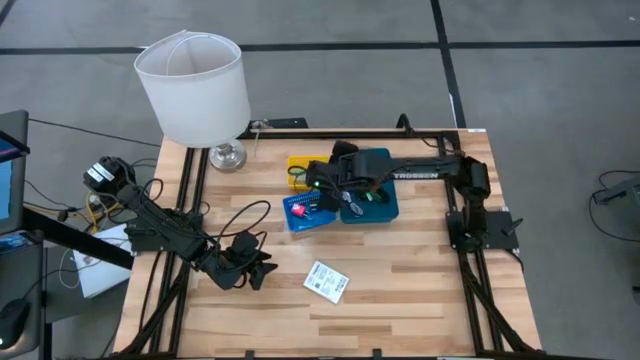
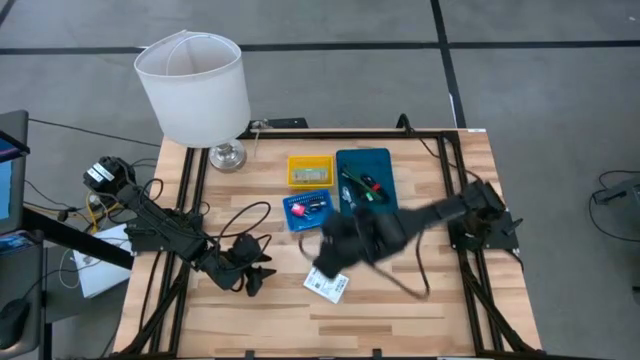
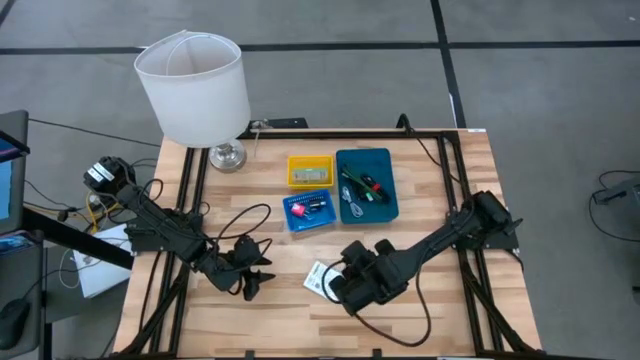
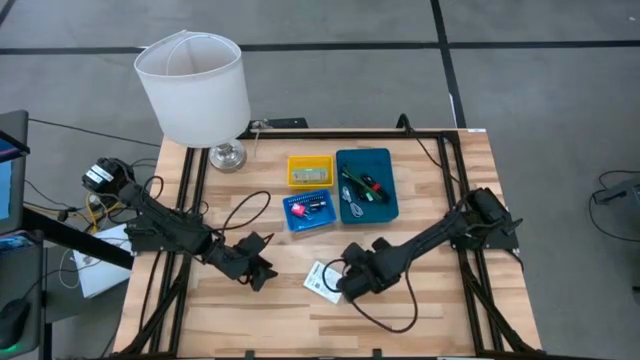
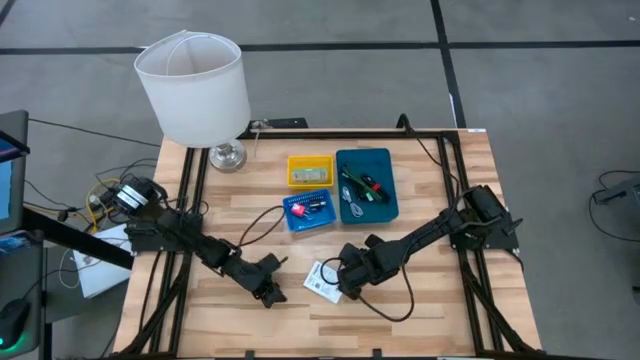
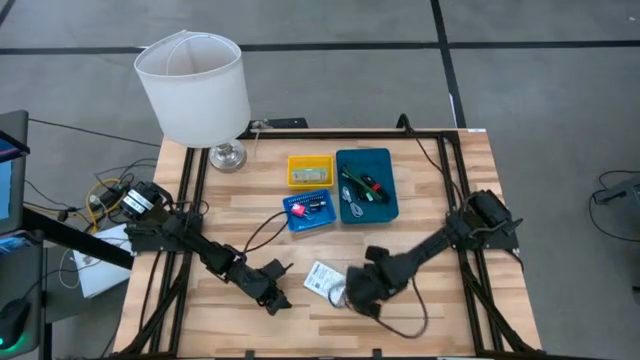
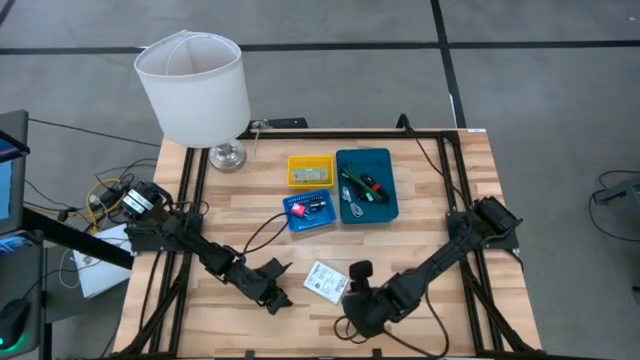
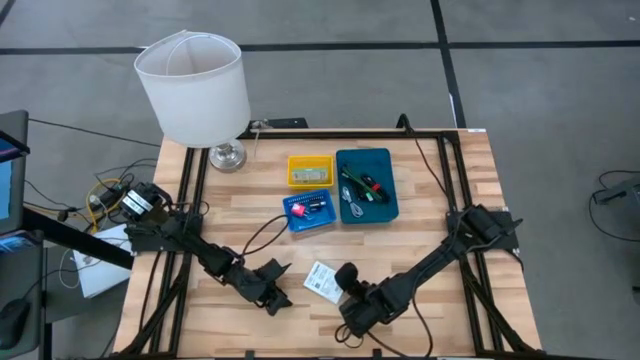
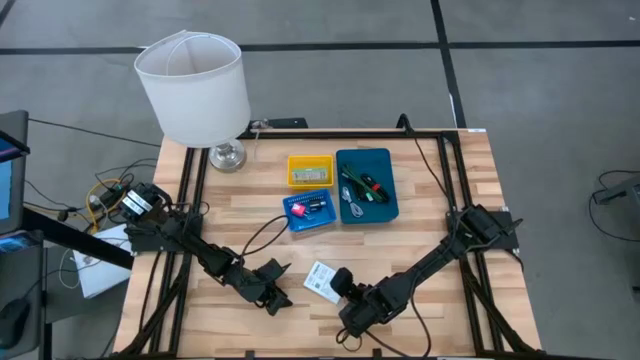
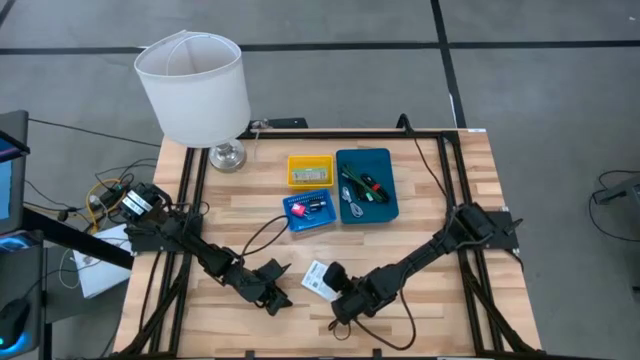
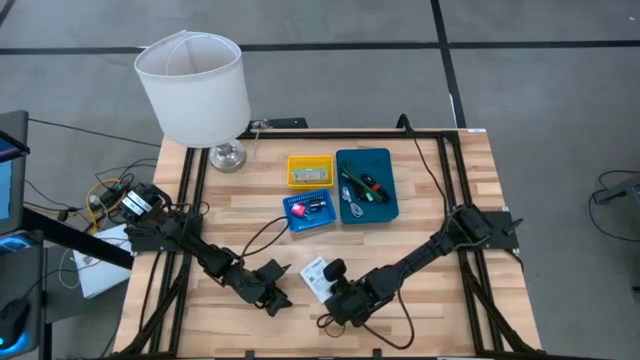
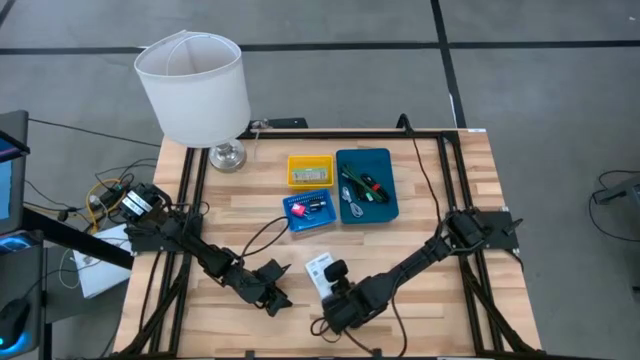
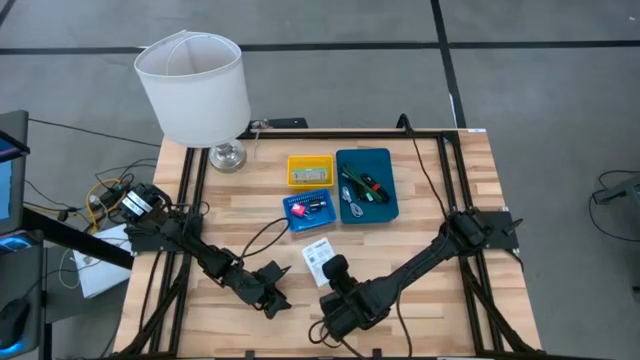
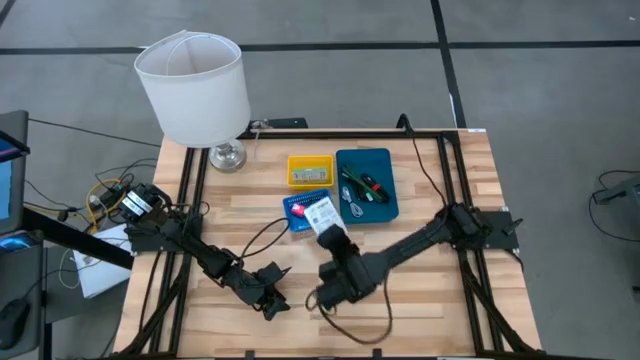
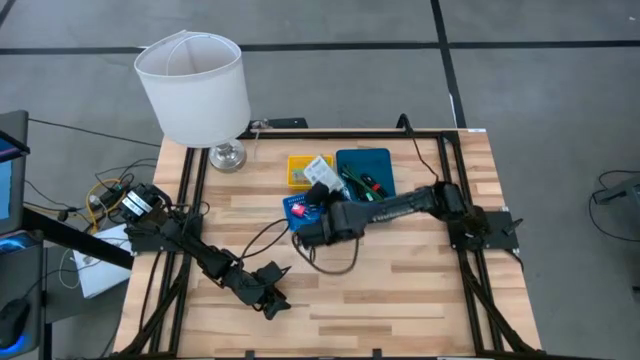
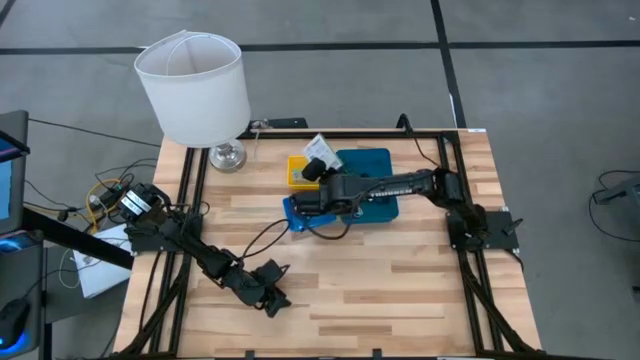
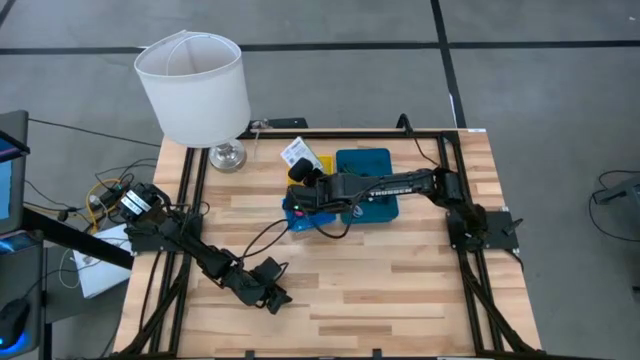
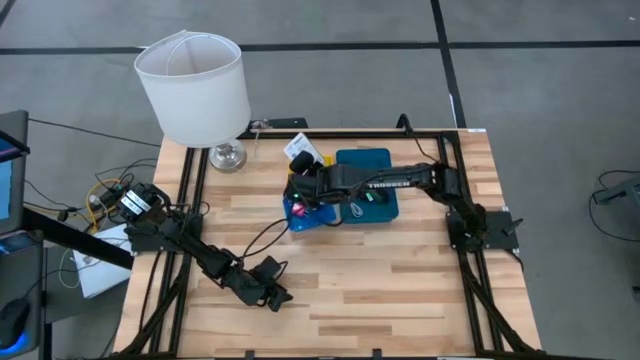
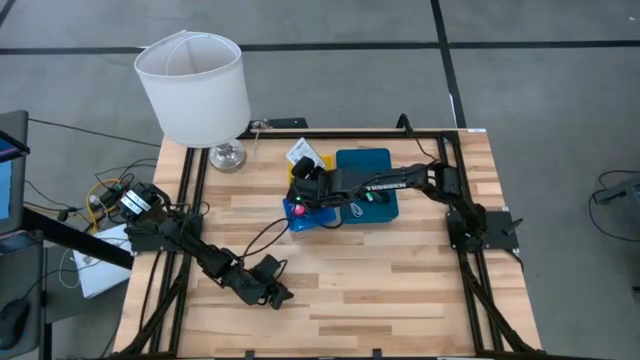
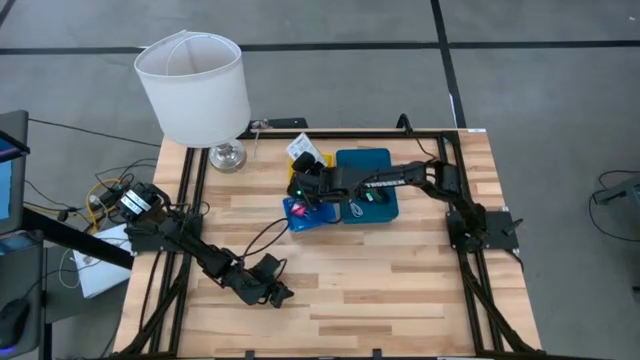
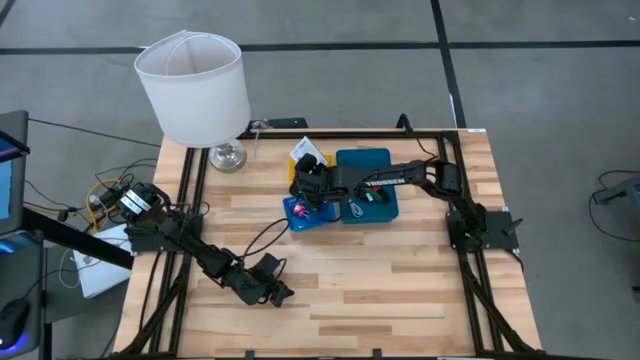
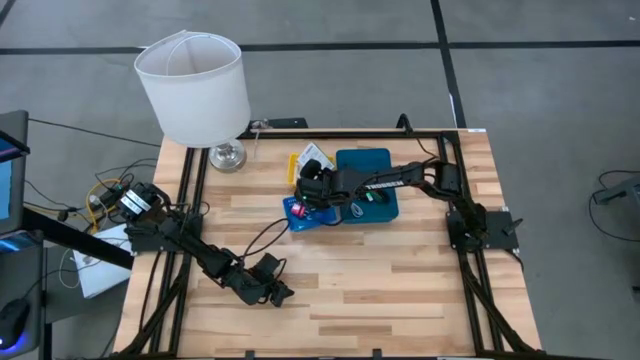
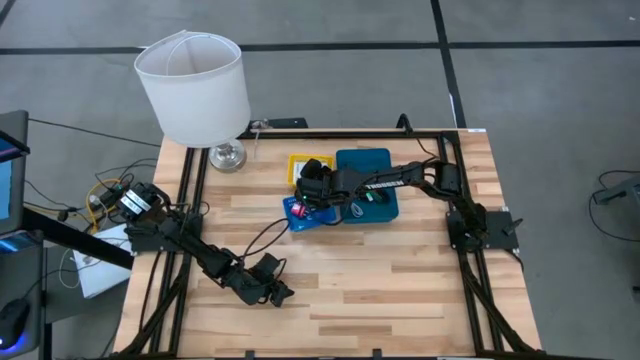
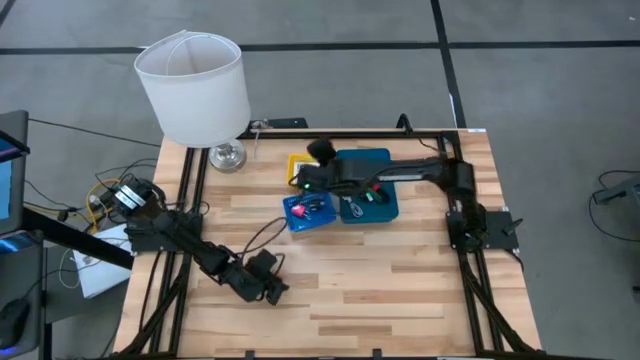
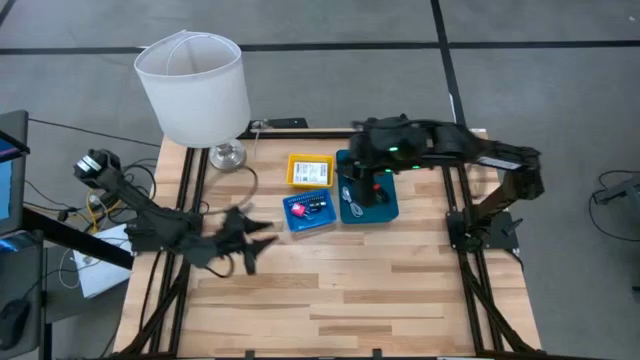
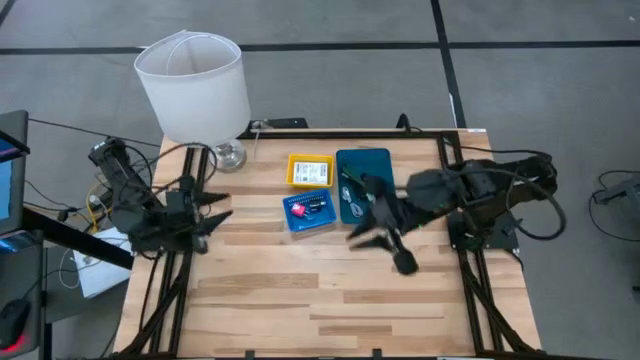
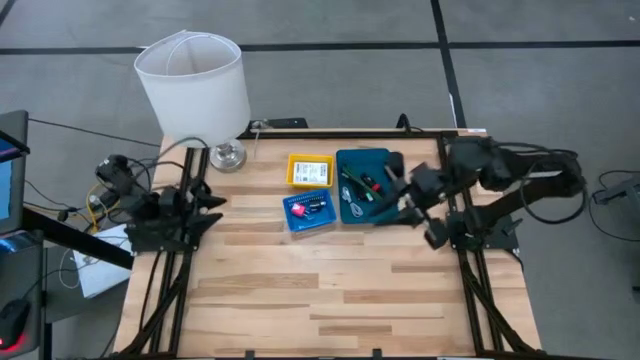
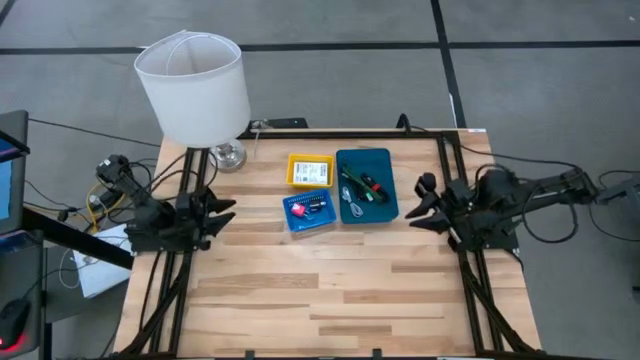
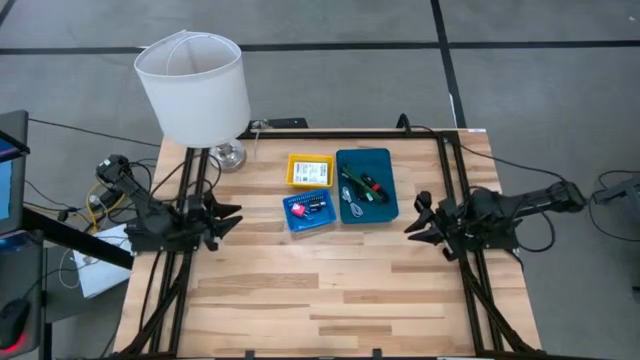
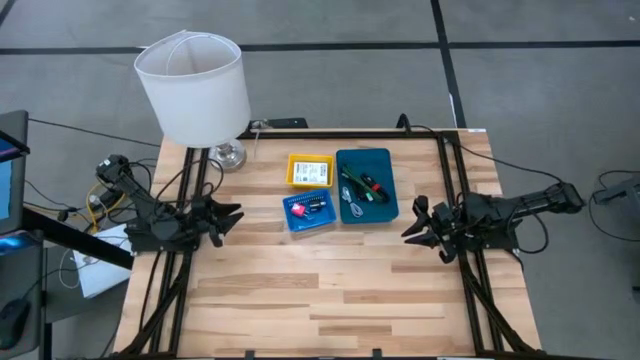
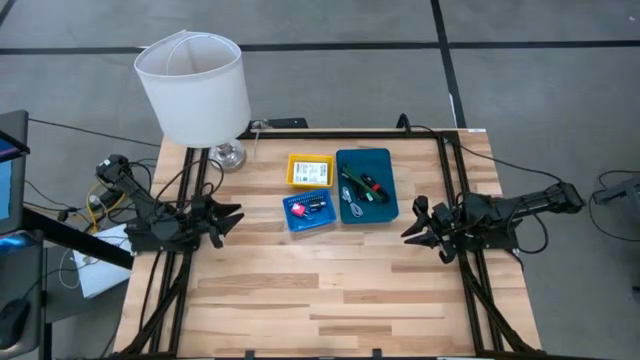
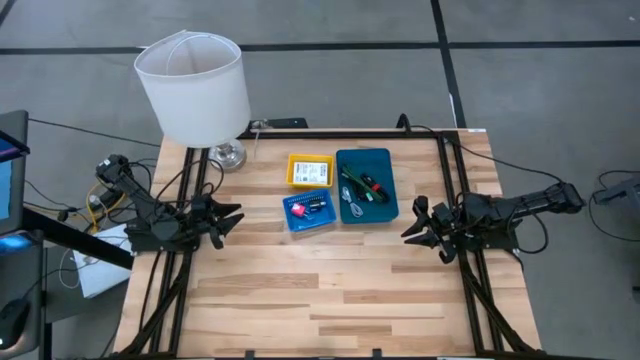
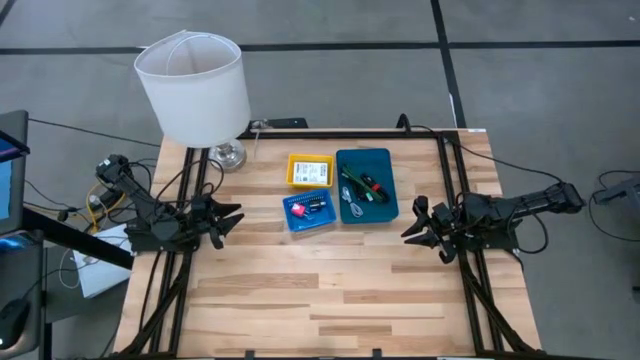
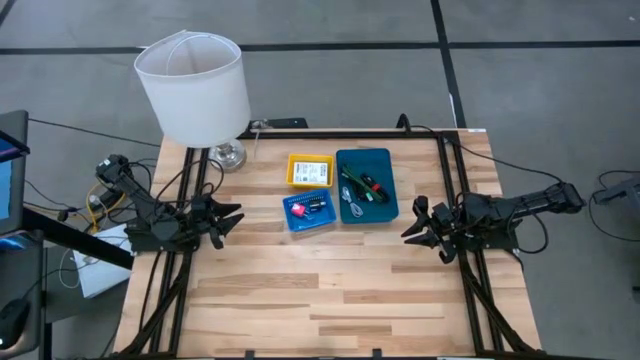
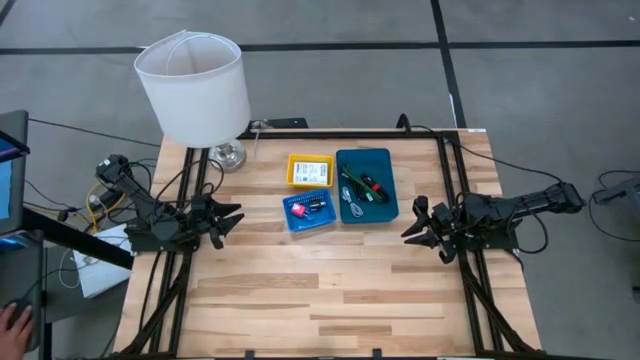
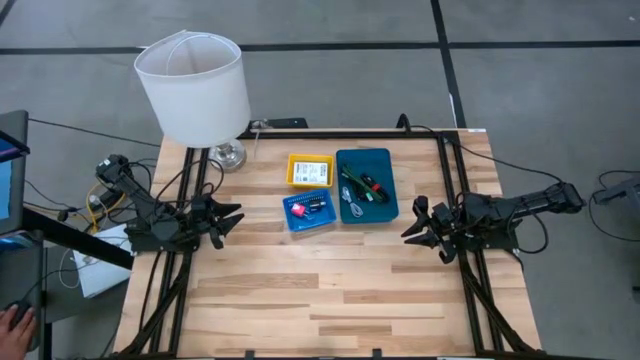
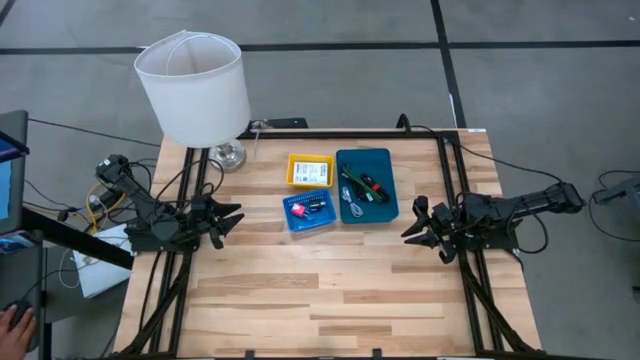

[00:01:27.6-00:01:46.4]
Task: Pick and place items into bin
Stack the white card reader box on top of the white card reader box in the yellow bin

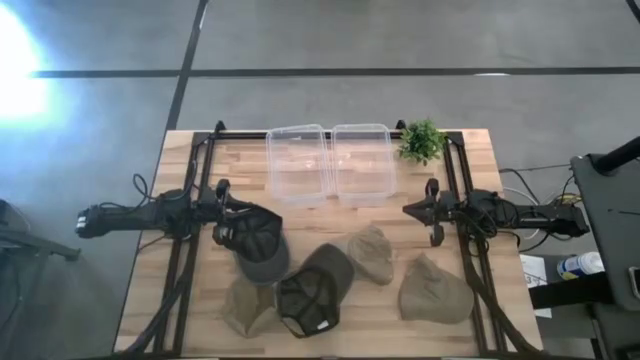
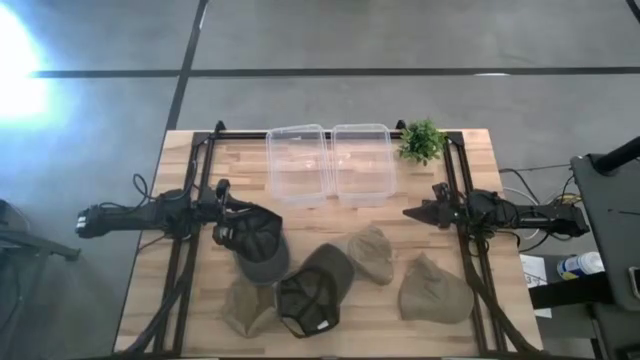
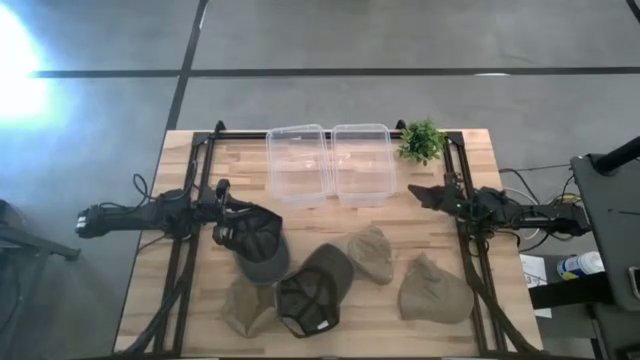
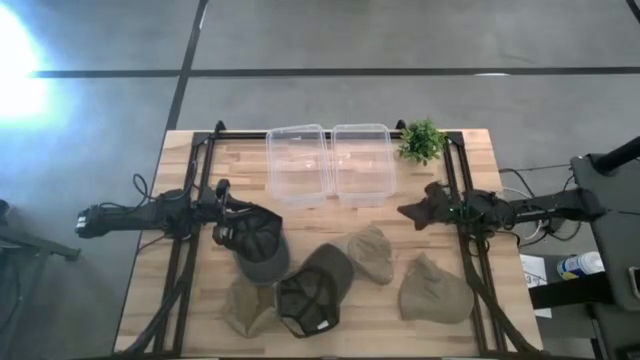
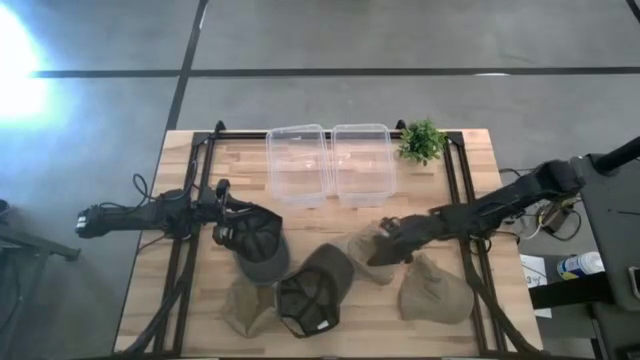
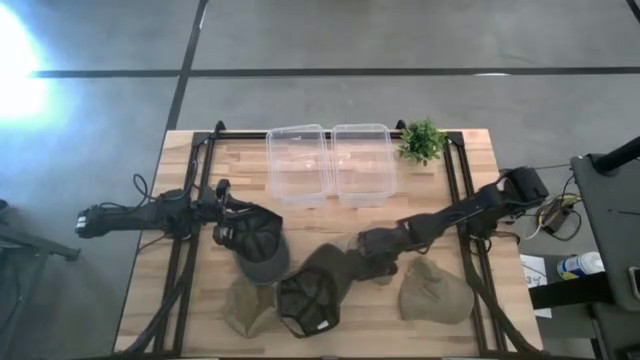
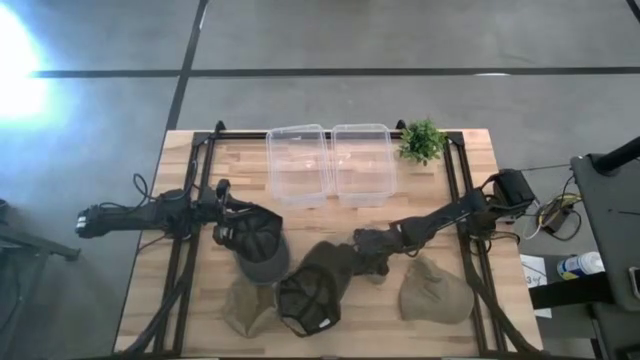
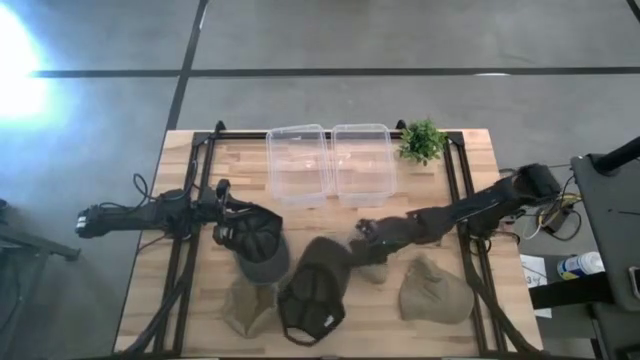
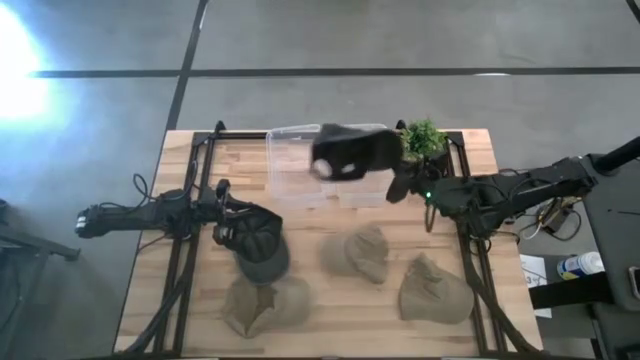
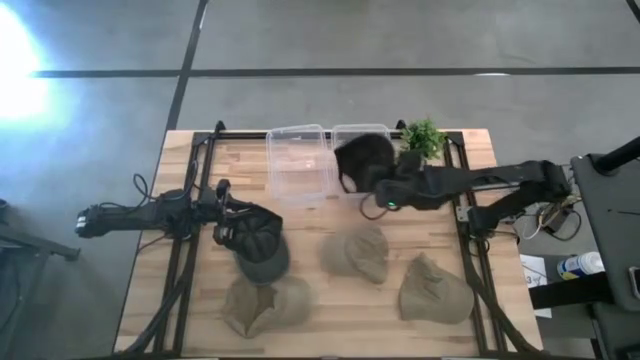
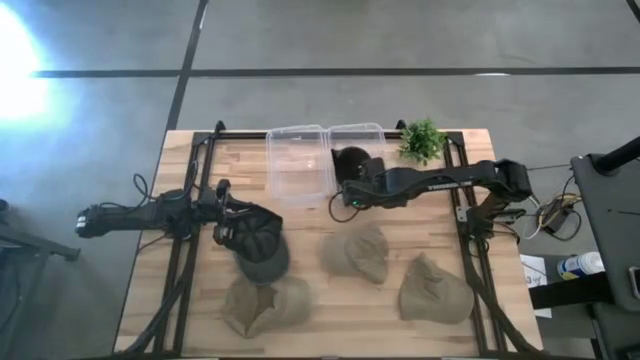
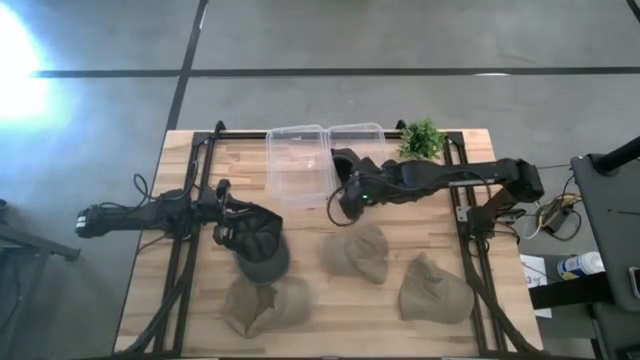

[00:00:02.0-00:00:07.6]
Task: Pick & Place hat
Put the right black cap into the right transparent bin
